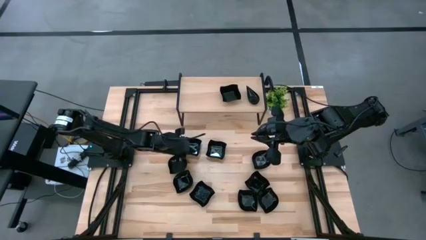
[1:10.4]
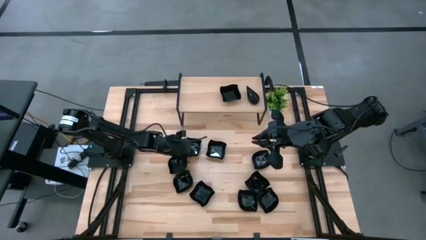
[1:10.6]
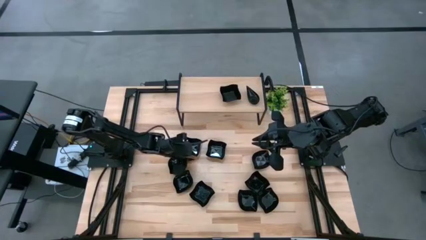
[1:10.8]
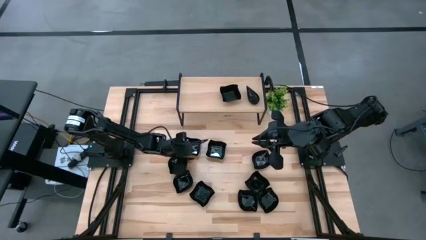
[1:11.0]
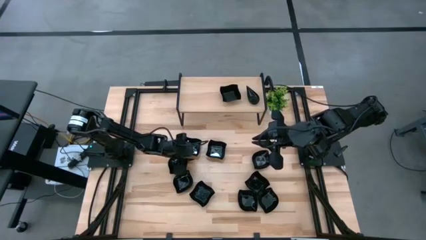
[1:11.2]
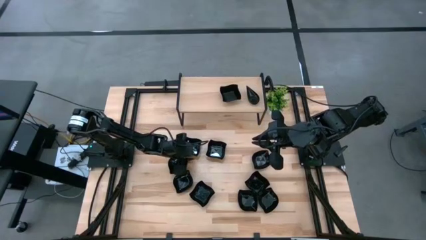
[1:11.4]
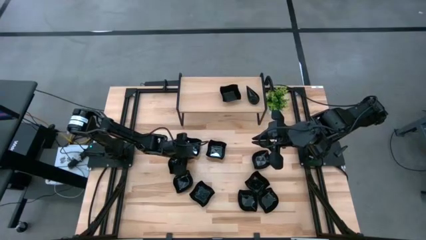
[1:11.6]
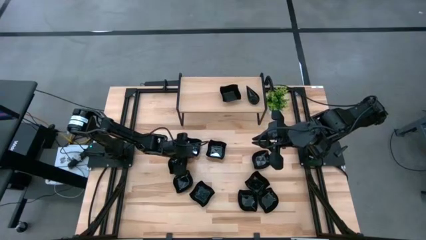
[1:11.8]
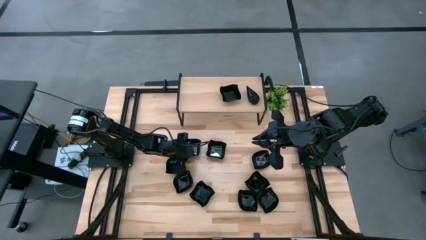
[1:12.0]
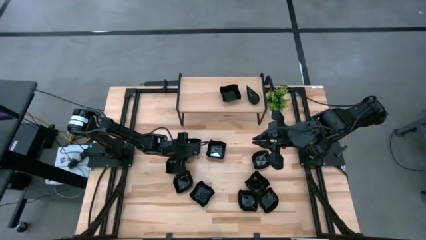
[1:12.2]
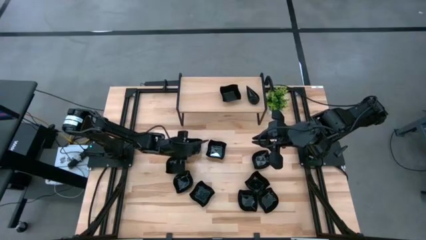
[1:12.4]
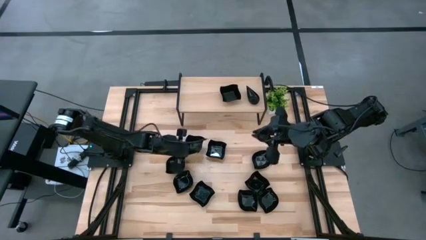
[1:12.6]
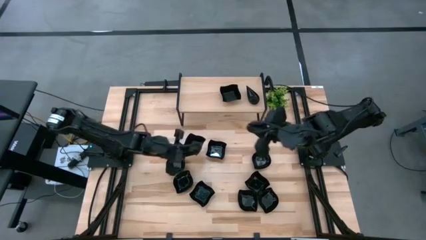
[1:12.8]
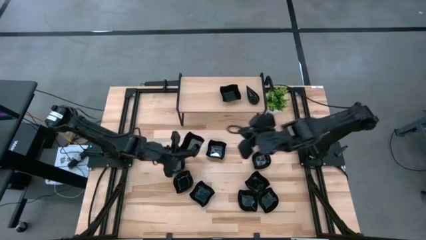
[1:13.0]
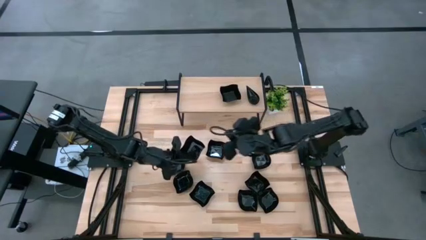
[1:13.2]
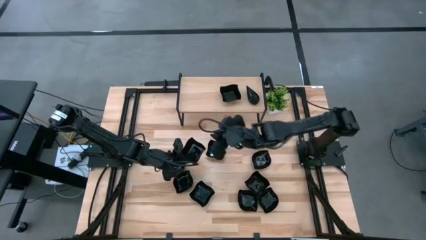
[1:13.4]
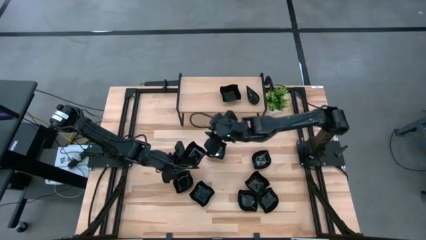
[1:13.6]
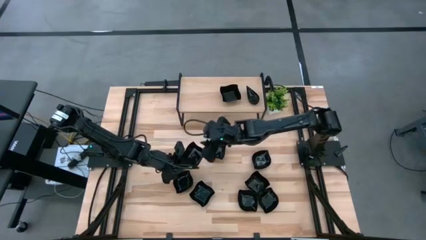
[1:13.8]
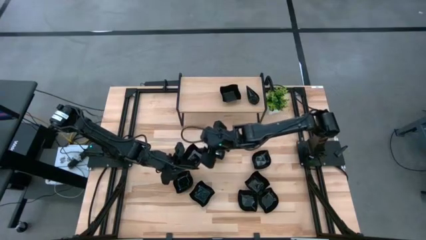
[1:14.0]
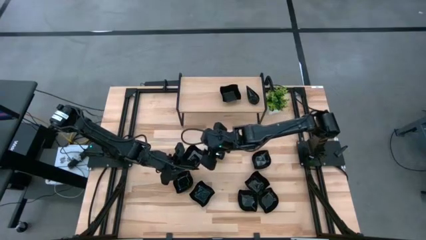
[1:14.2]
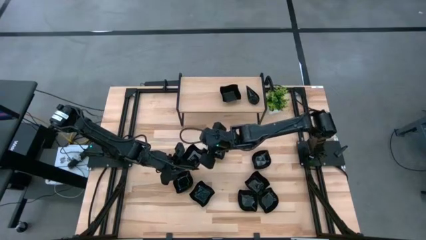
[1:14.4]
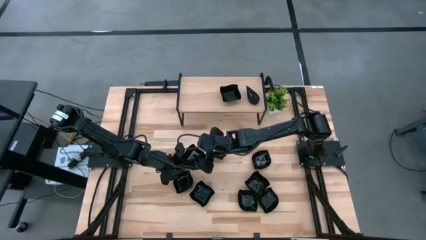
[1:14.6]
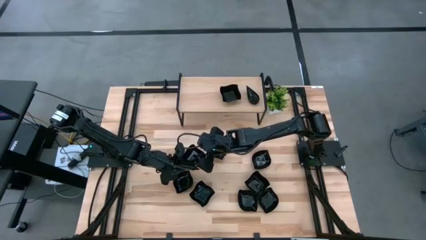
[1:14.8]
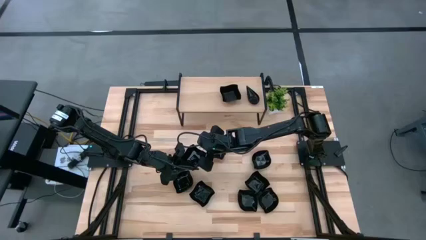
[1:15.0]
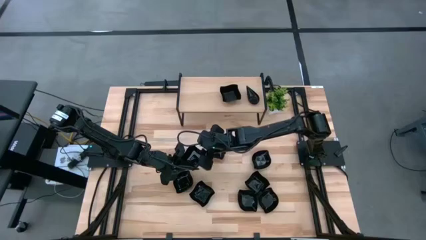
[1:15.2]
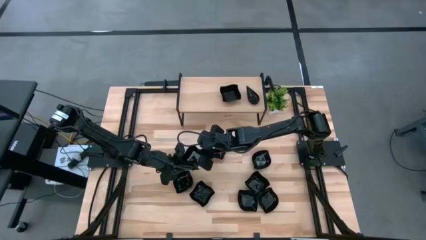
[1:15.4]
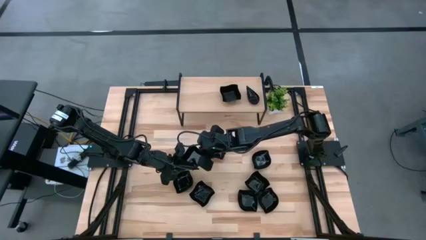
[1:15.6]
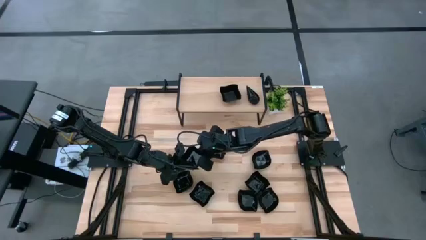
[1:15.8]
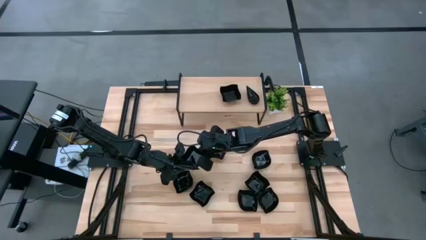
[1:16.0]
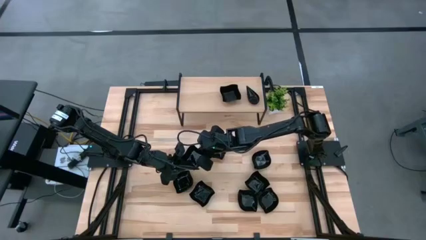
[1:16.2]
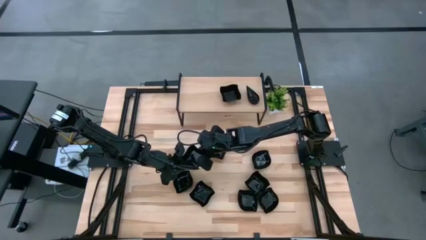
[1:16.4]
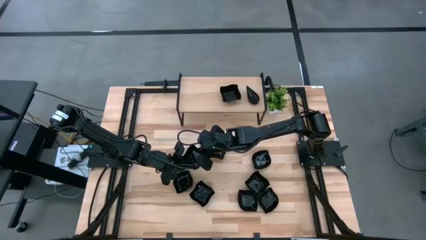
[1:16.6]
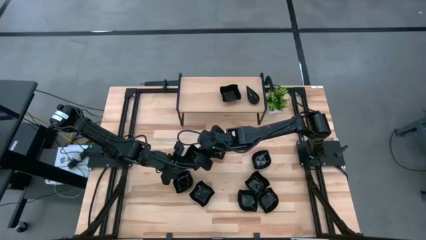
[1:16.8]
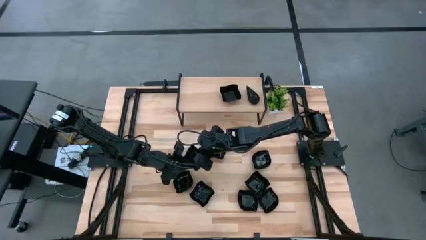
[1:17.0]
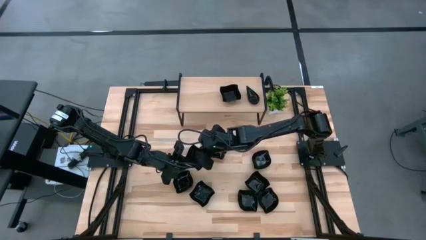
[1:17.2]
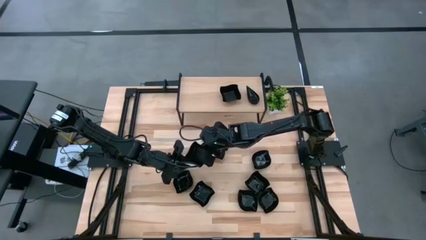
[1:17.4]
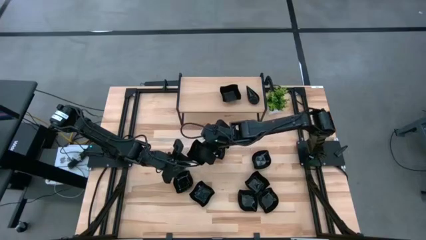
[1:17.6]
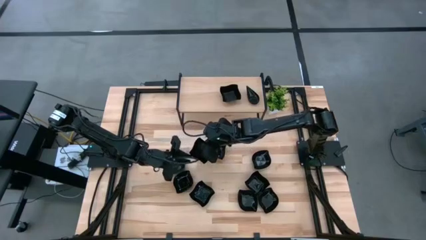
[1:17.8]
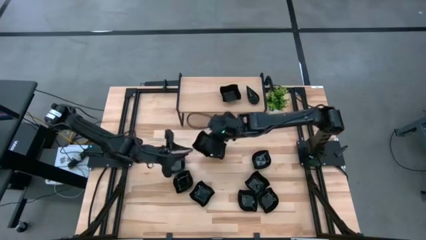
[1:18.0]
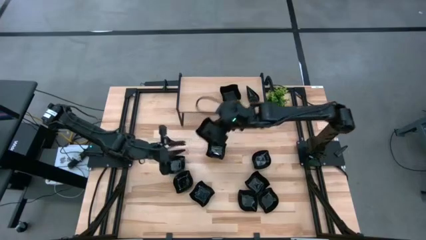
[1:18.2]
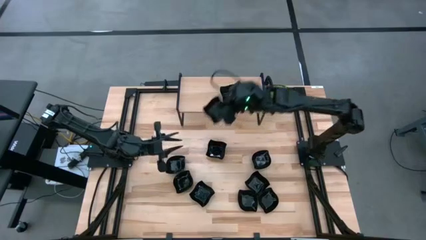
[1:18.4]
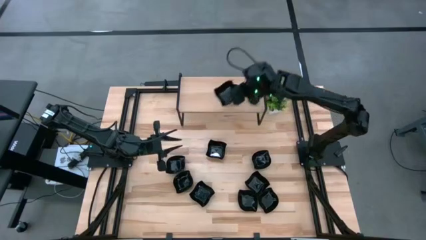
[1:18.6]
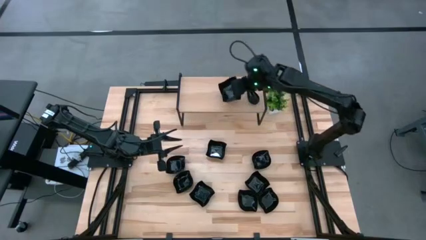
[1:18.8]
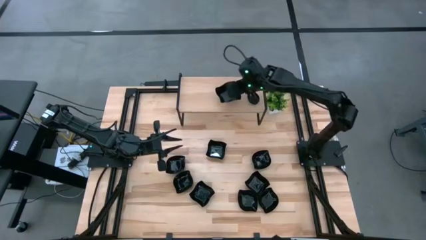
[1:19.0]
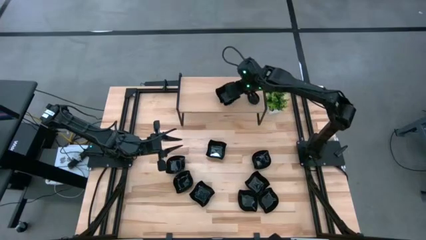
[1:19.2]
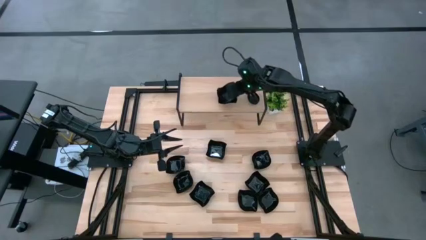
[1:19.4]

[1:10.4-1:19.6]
Task: Pick & Place Mini shaped plates
Stack the black distorted square plate on top of the black distorted square plate on the shelf

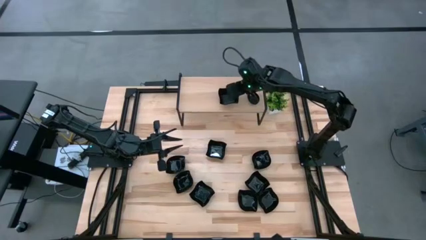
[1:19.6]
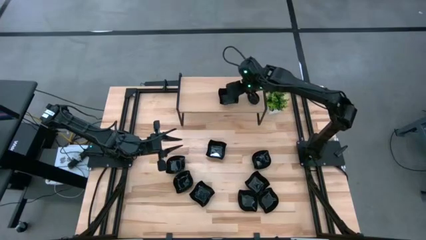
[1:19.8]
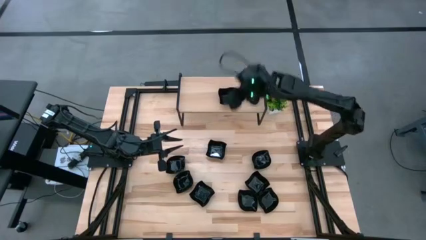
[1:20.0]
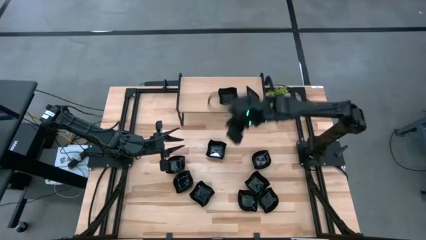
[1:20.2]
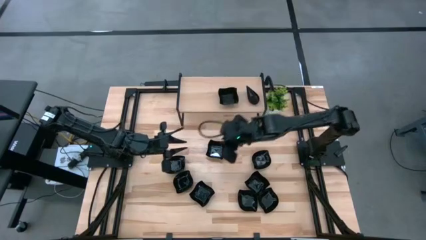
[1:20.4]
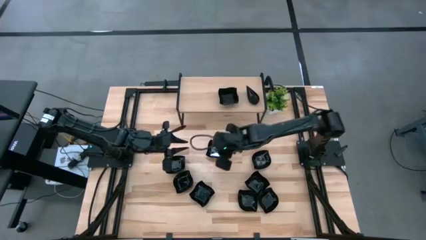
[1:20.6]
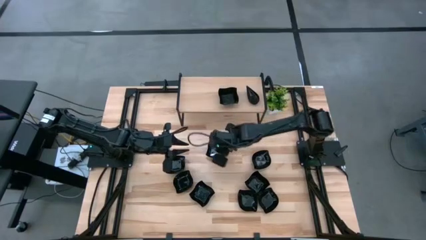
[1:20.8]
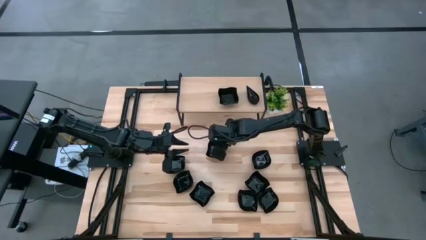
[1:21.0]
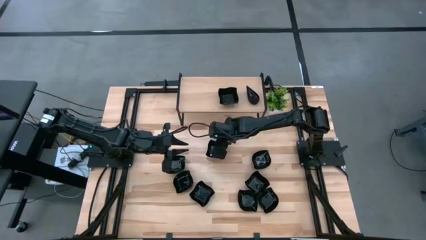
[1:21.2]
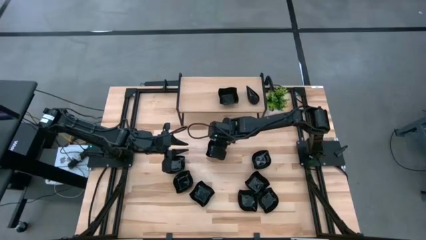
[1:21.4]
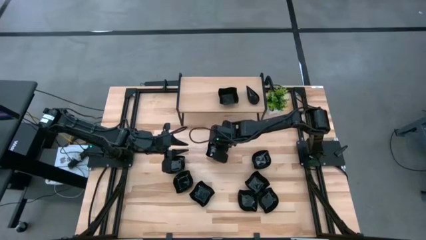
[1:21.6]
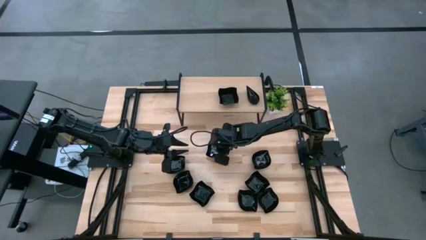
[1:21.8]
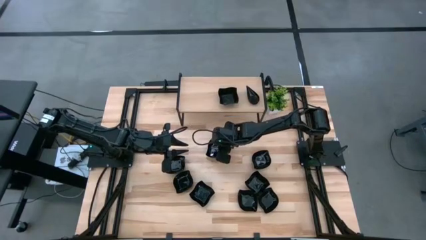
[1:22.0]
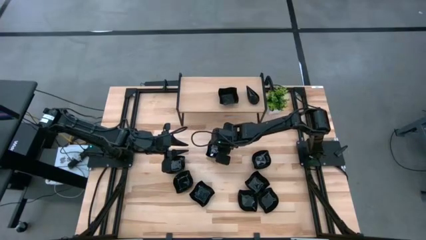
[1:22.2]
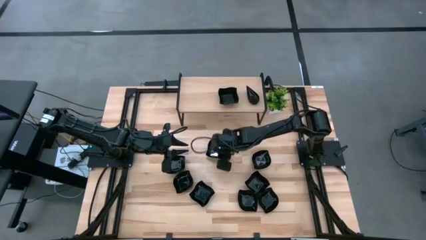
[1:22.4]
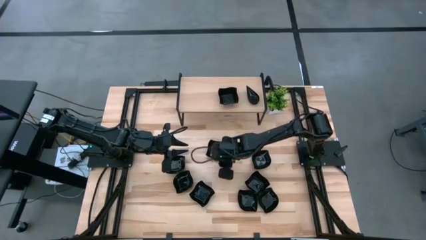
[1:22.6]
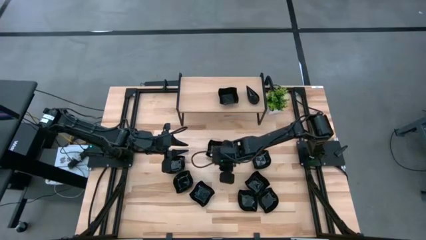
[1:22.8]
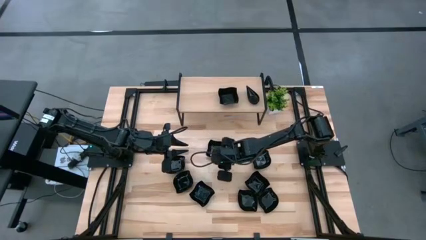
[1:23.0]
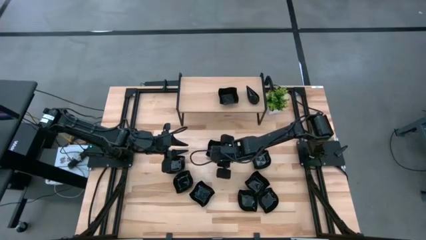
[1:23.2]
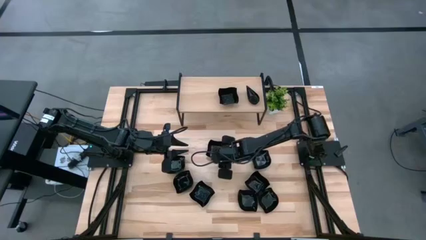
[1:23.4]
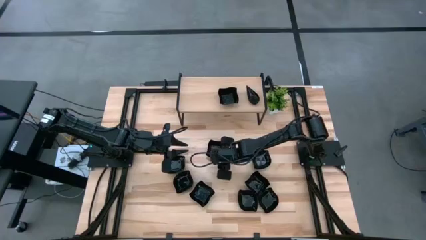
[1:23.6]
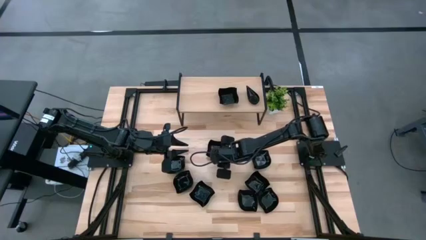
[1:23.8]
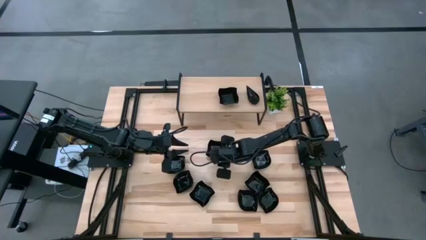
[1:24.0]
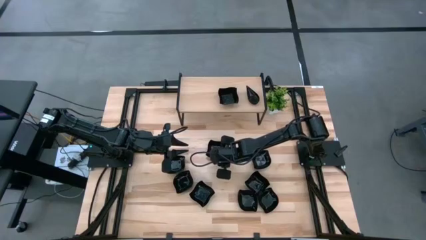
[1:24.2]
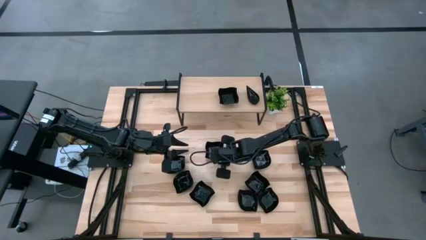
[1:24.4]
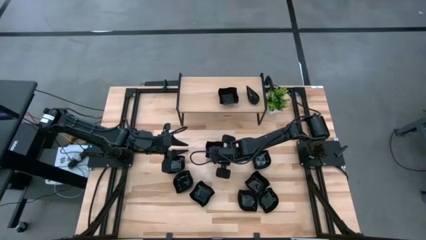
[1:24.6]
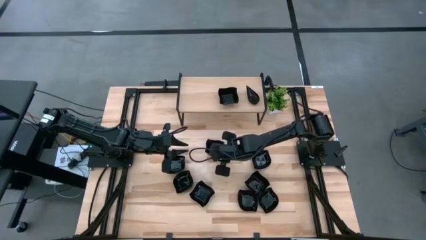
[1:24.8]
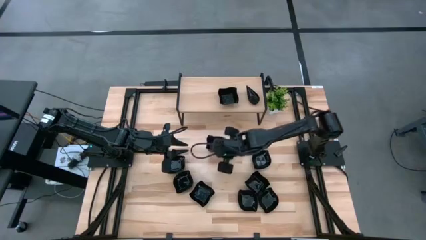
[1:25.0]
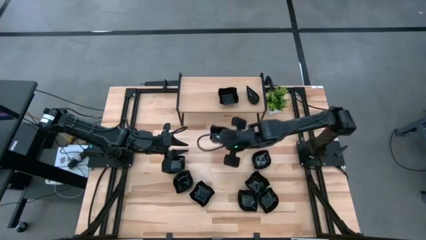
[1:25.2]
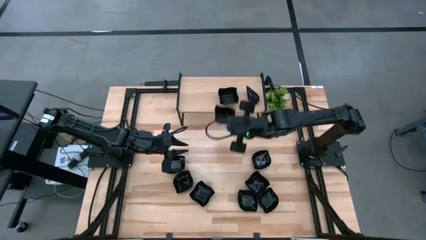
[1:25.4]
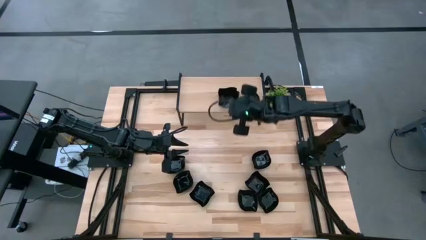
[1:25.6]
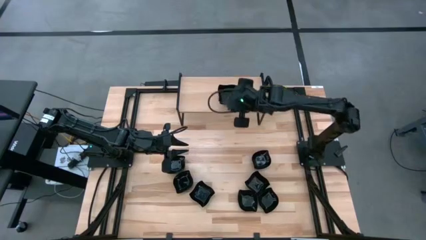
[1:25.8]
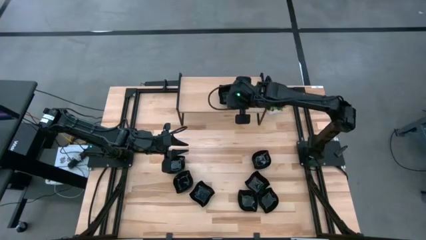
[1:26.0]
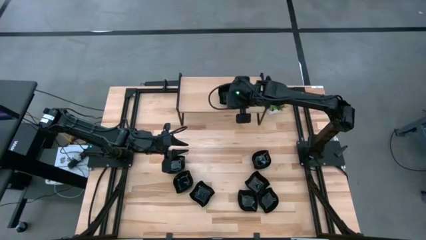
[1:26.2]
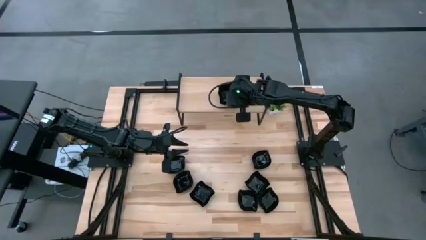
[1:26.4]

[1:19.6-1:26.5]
Stack the black distorted square plate on top of the black distorted square plate on the shelf
